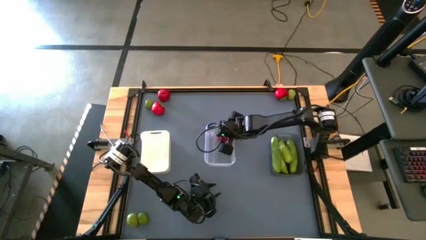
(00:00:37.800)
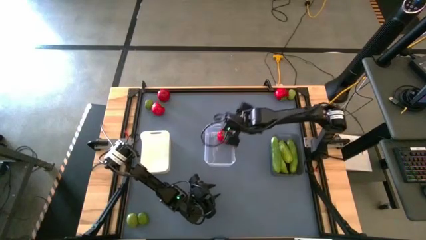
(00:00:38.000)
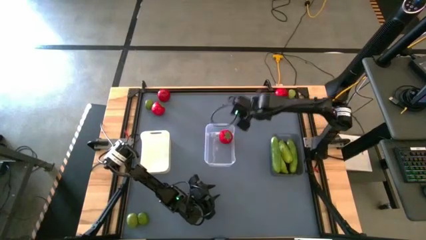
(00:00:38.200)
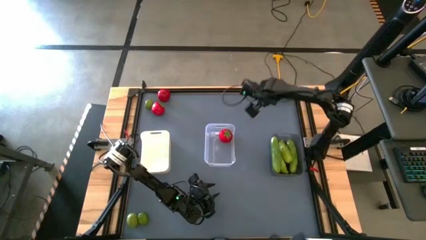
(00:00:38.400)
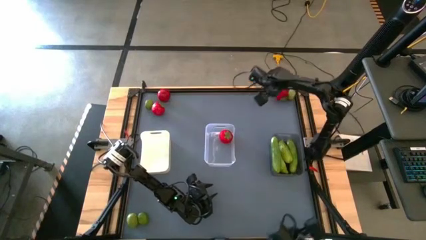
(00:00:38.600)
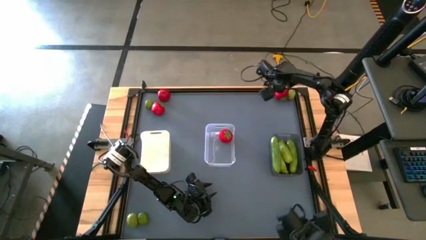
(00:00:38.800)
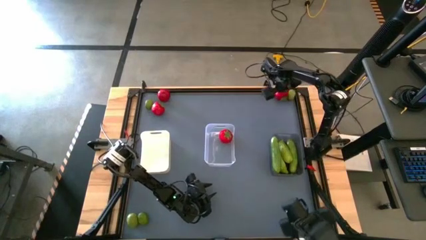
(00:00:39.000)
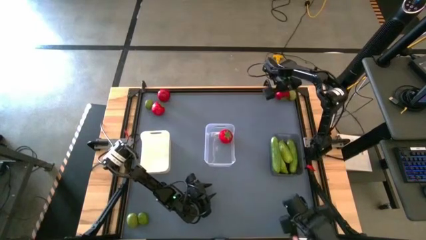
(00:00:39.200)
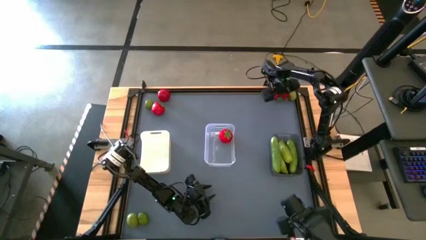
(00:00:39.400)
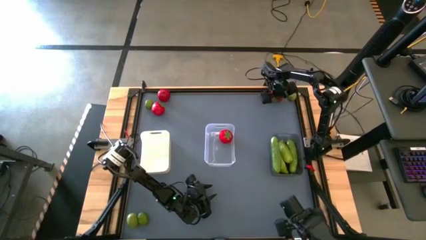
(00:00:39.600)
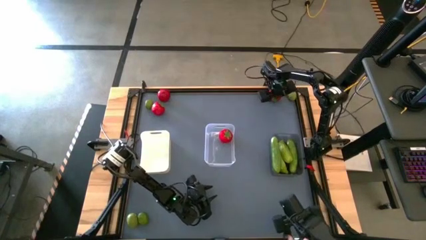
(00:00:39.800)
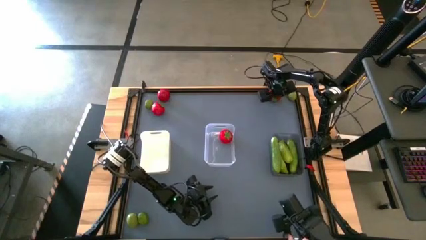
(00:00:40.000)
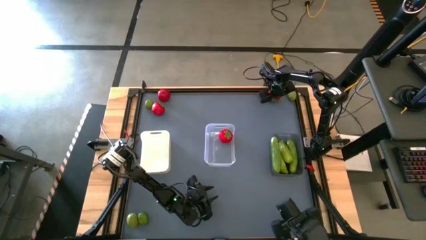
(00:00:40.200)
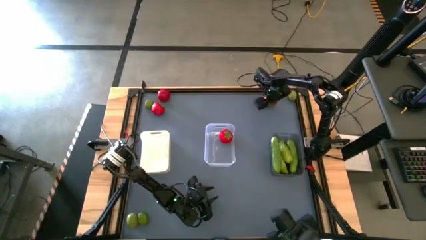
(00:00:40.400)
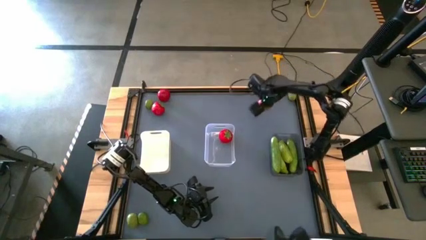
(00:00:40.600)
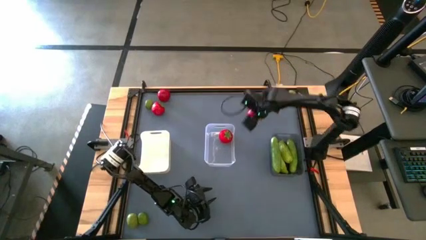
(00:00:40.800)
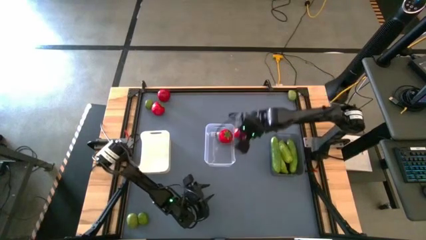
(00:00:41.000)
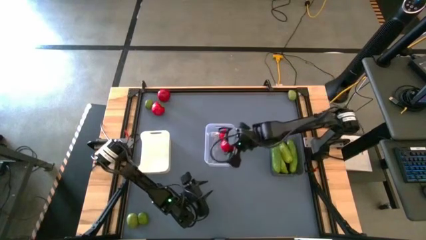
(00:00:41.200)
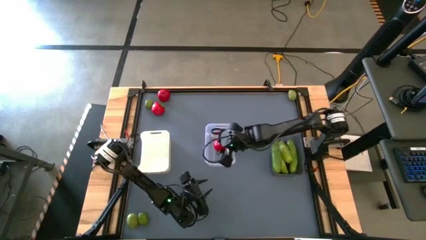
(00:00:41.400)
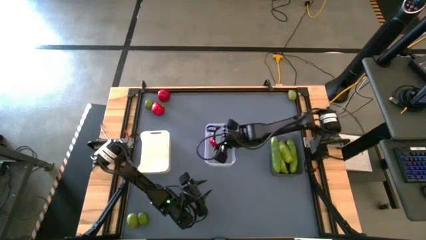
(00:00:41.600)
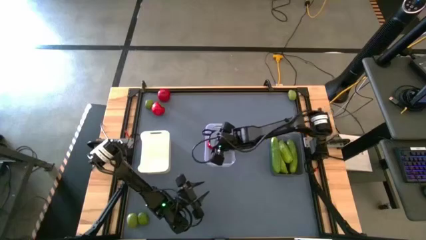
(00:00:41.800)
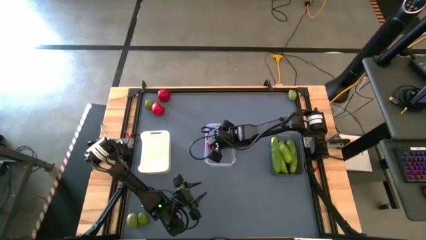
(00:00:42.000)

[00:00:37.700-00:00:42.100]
Task: Sort produce into baskets
Put the red tomato into the transparent bin

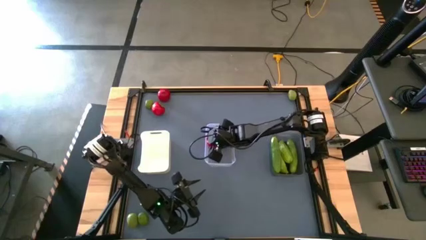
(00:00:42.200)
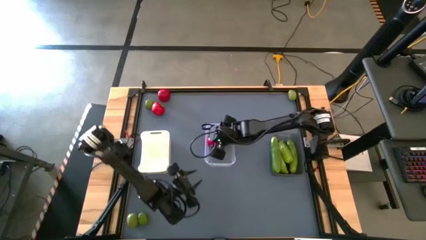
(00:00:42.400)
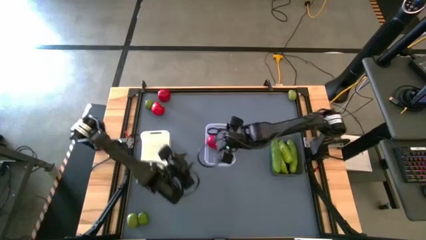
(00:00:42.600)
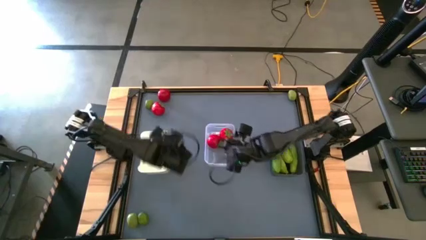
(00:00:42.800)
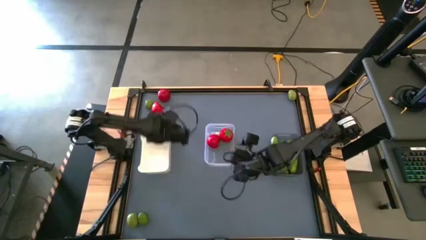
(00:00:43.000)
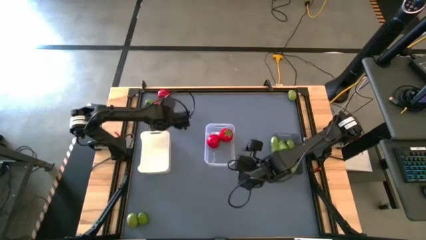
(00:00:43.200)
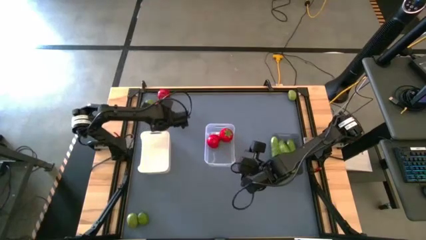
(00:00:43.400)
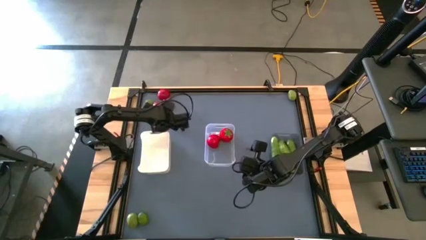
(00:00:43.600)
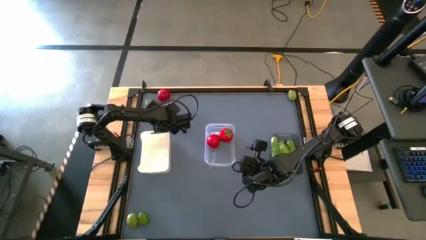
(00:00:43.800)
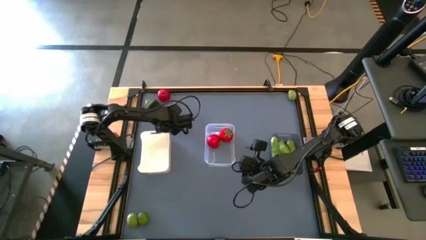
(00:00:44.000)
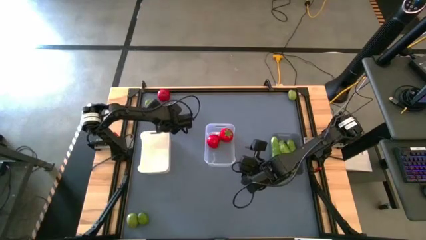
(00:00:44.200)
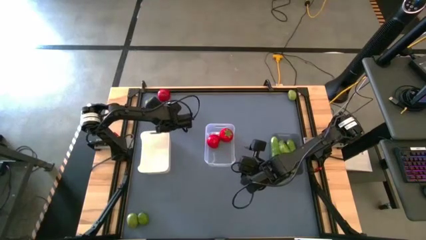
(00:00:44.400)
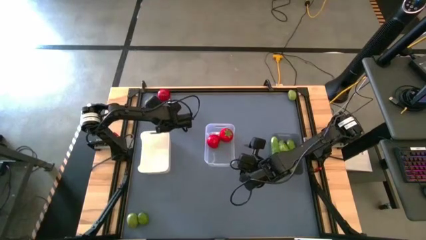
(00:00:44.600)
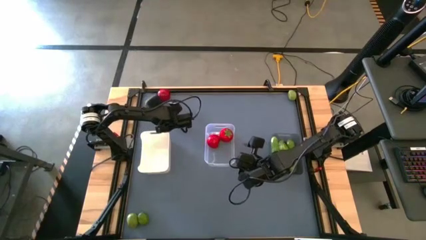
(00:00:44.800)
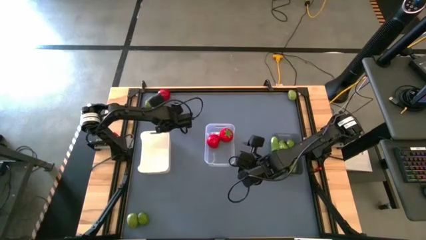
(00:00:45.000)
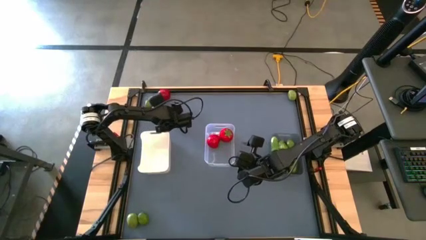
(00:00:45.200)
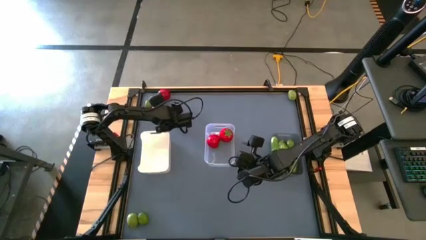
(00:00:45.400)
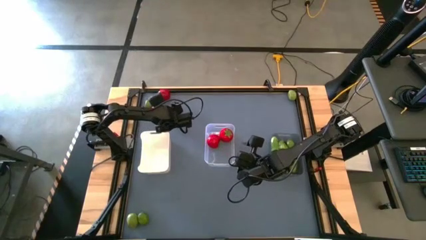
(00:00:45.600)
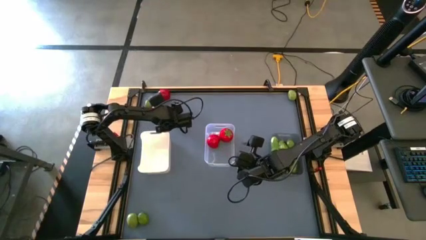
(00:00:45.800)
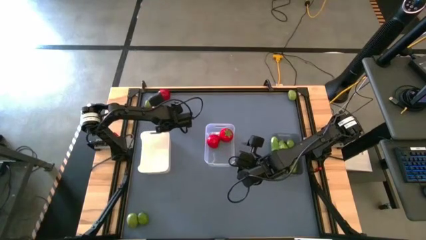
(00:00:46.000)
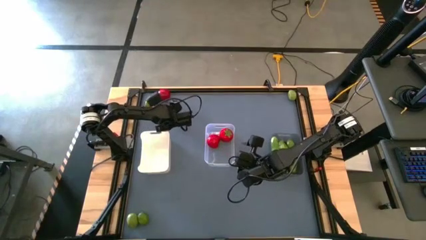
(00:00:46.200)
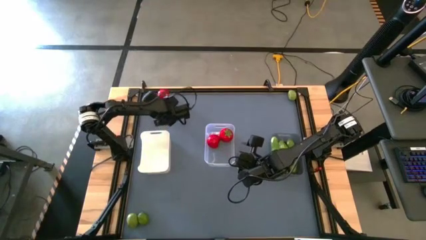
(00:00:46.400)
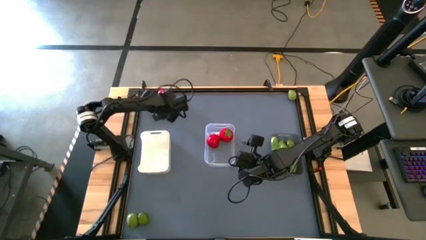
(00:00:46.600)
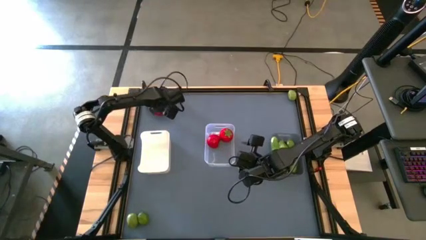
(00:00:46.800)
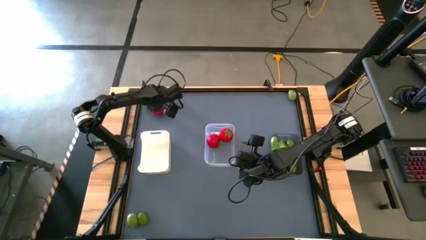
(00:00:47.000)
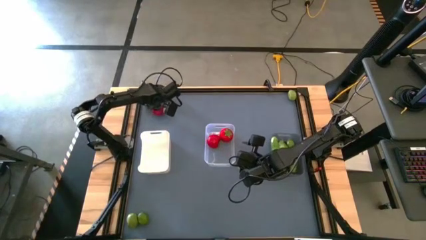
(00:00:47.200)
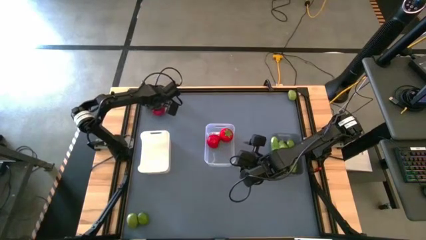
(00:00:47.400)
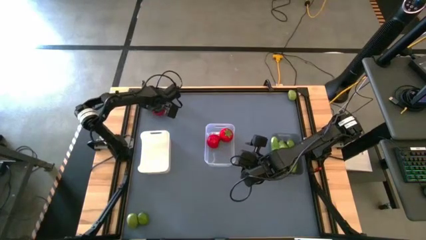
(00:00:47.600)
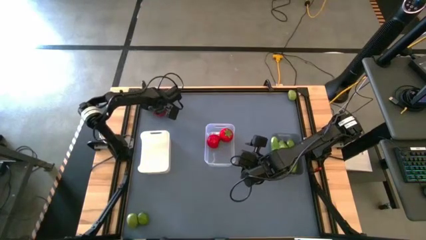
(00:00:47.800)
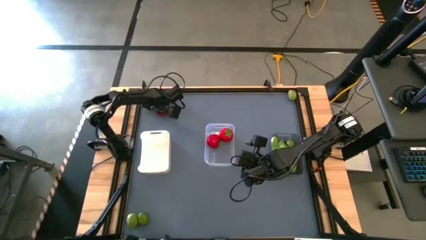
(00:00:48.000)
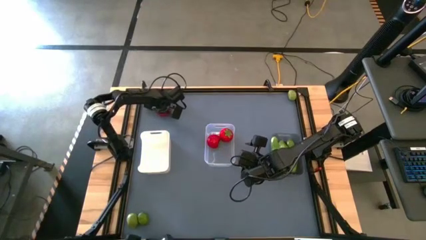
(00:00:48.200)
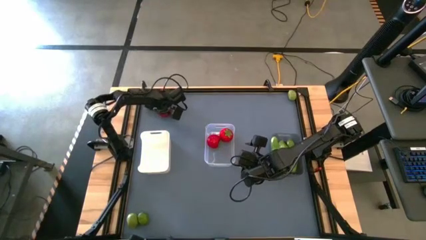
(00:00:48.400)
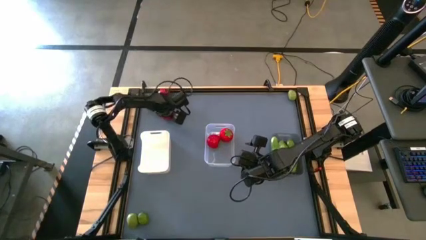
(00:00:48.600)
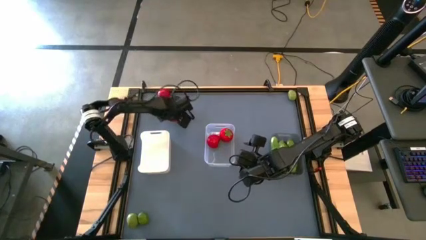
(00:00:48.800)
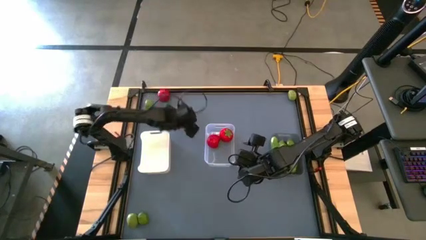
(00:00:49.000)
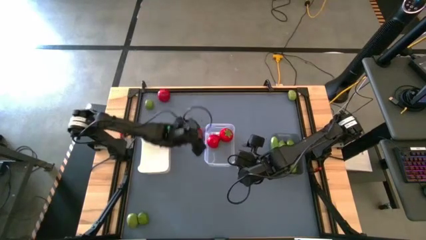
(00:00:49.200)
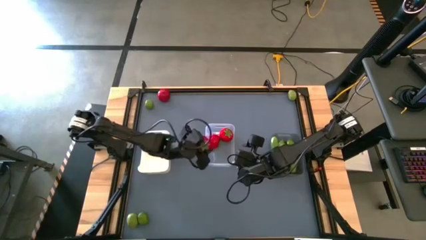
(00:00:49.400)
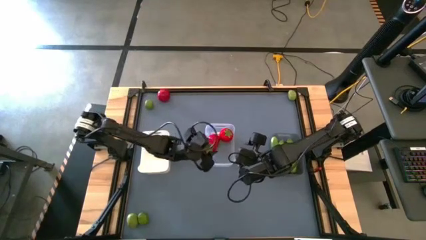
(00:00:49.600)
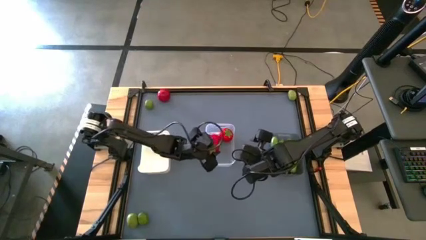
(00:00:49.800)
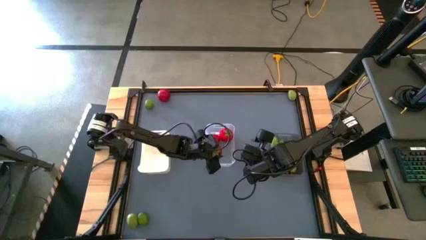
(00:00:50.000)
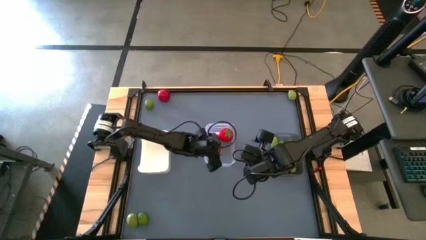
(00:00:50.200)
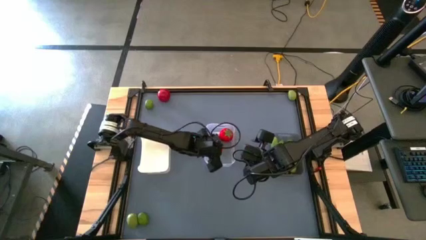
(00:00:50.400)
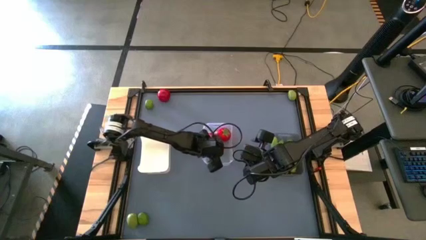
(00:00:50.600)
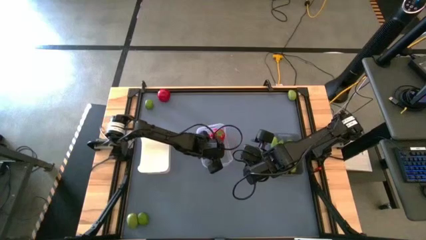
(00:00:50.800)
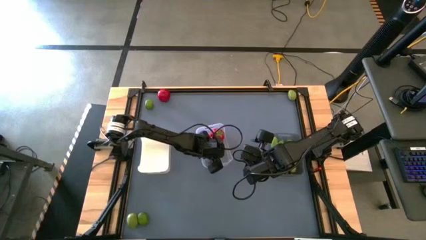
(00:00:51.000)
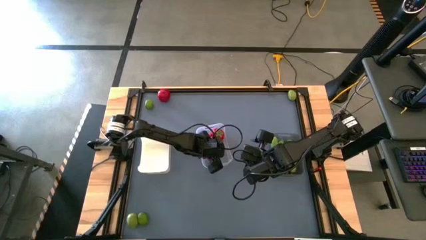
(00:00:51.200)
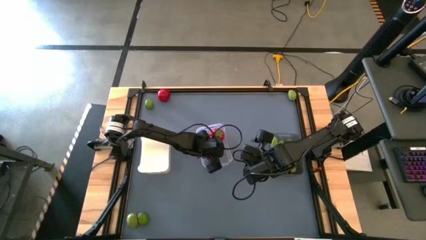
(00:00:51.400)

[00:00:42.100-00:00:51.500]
Put the red tomato into the transparent bin

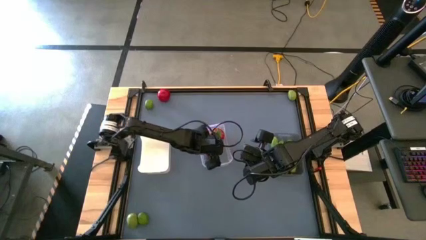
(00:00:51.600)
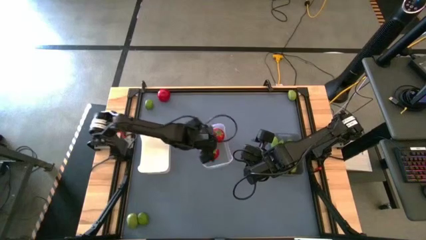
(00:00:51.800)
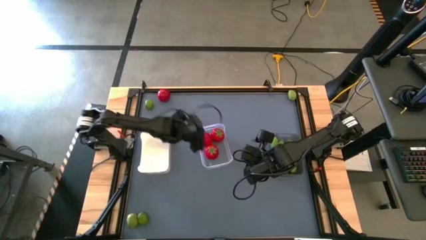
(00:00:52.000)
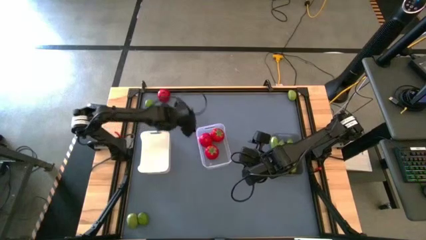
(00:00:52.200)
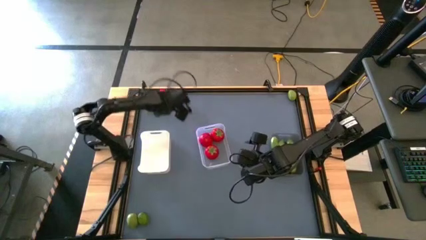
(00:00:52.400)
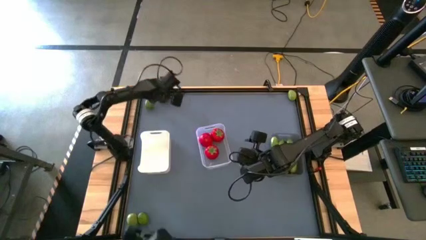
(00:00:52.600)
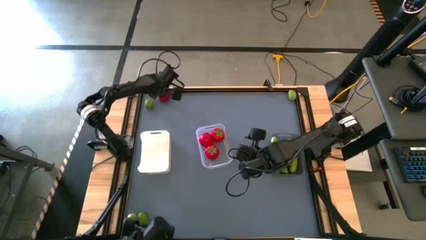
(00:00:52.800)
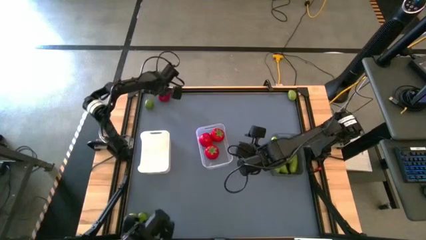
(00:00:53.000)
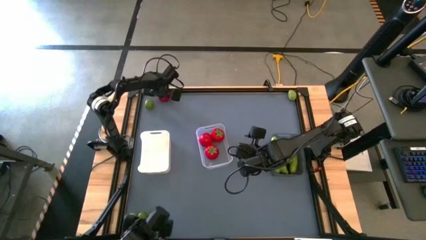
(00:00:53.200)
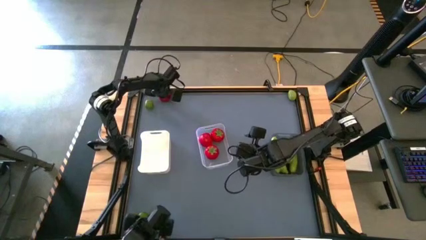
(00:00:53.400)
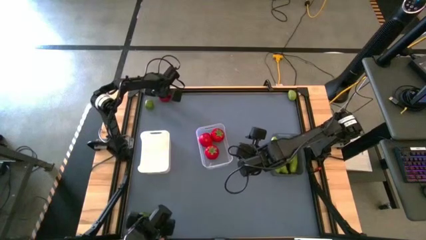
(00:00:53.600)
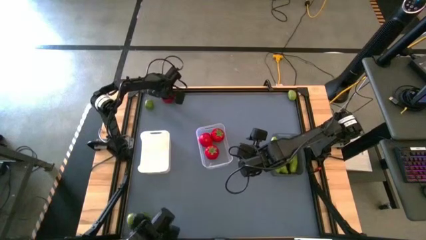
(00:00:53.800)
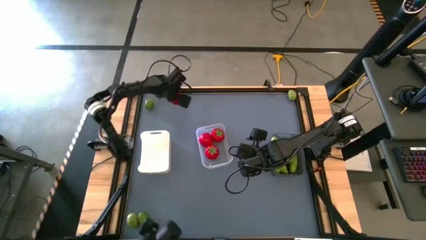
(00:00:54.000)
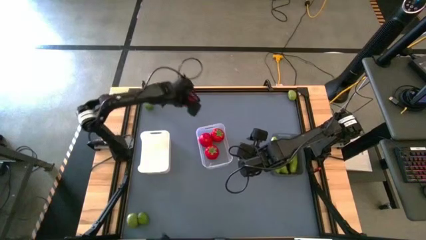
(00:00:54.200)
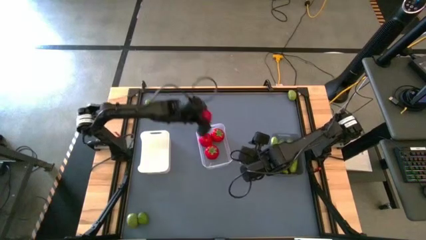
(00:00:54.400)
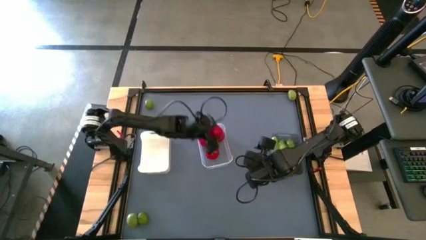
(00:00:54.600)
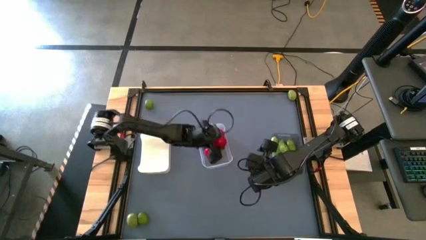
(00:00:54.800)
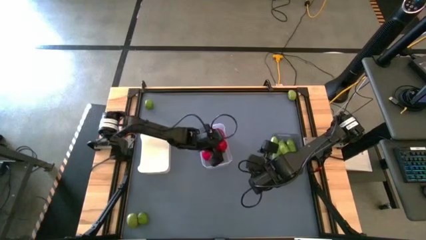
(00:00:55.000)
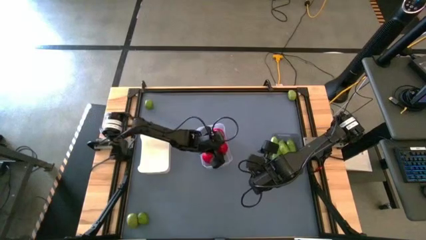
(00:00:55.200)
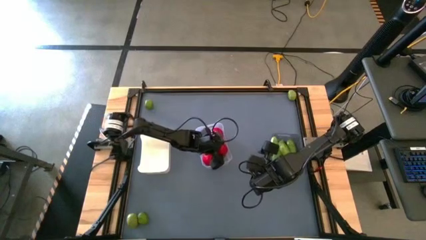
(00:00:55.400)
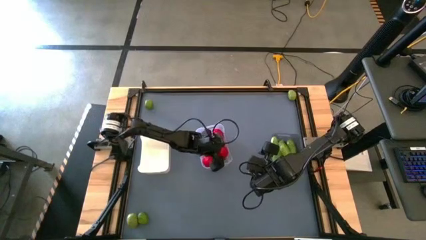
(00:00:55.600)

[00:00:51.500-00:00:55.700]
Put the red tomato into the transparent bin
